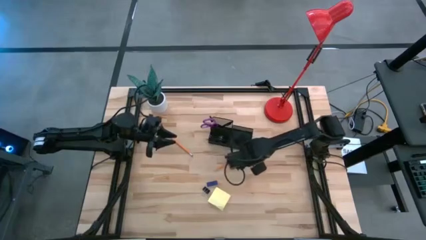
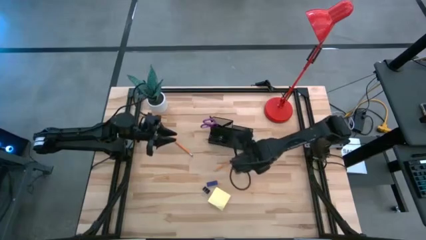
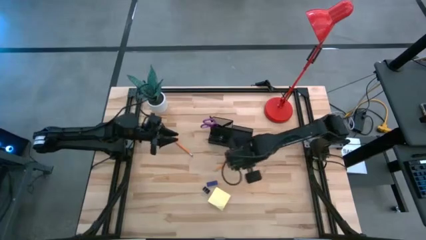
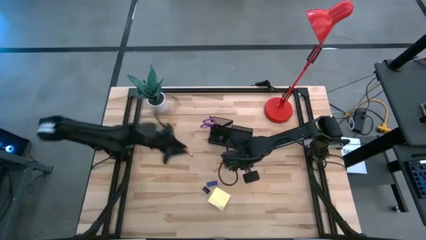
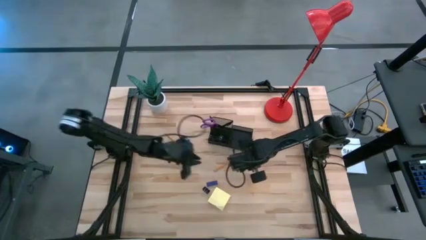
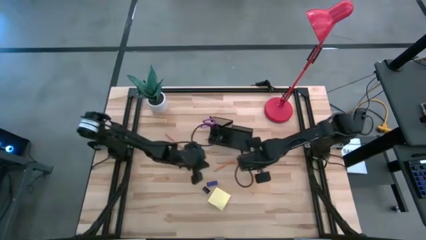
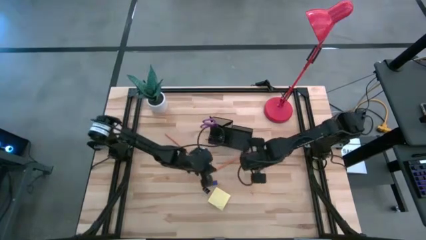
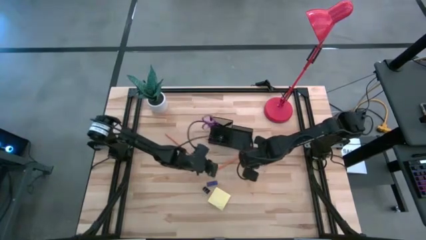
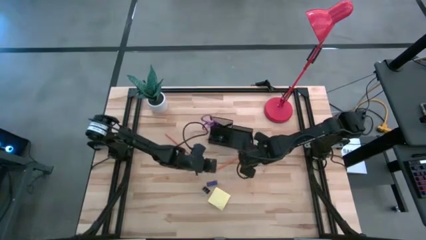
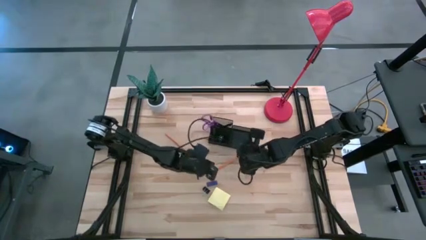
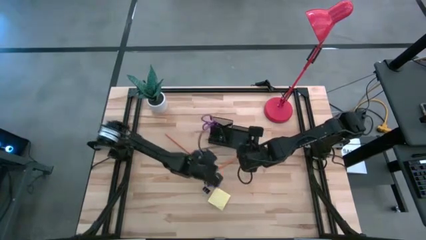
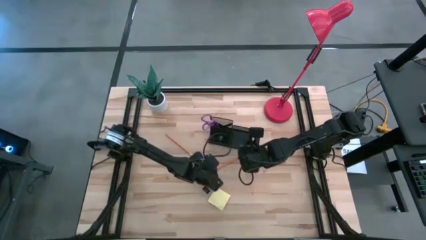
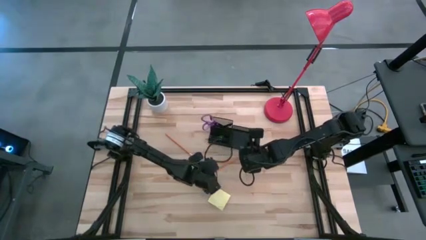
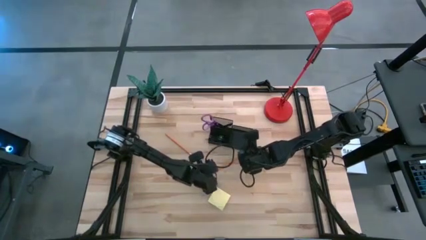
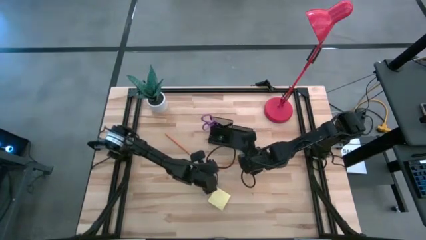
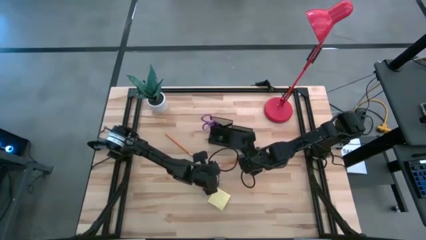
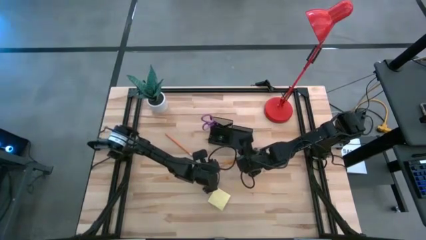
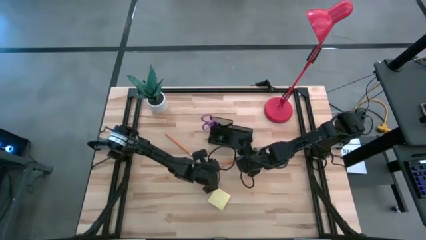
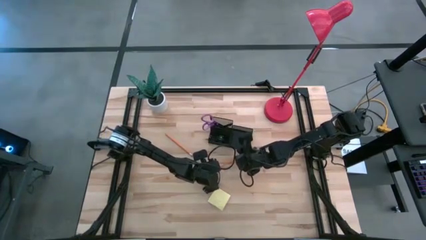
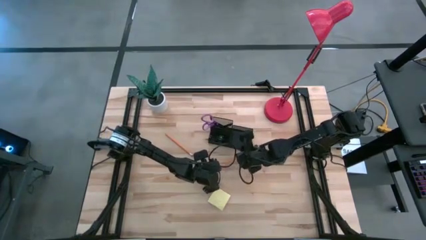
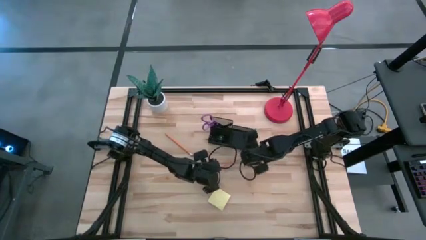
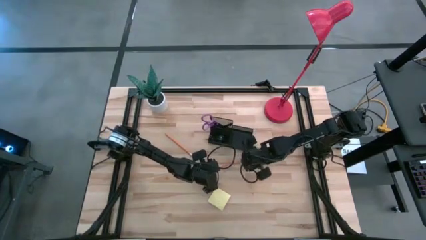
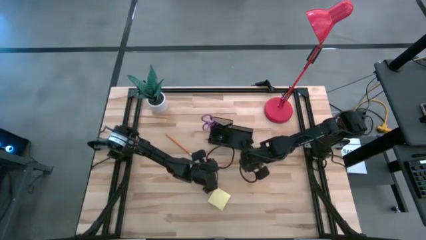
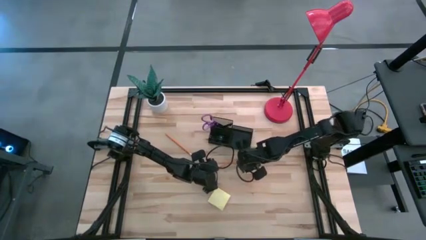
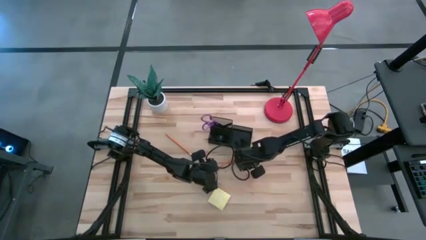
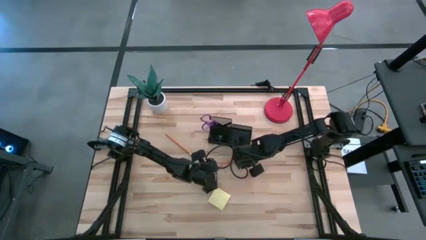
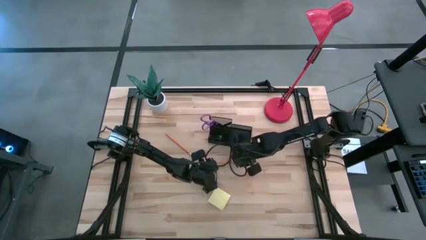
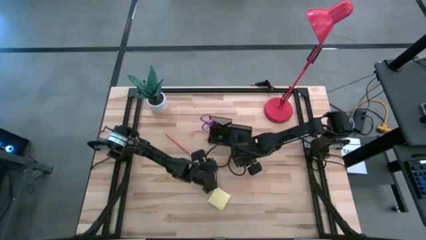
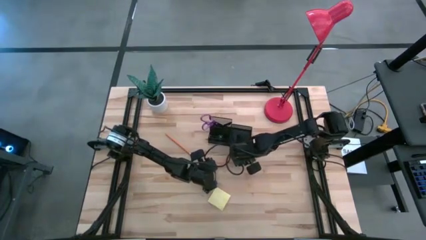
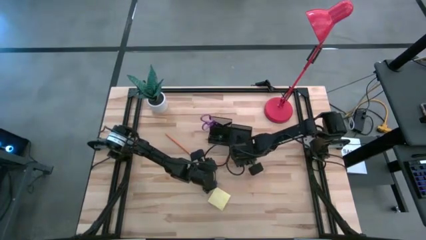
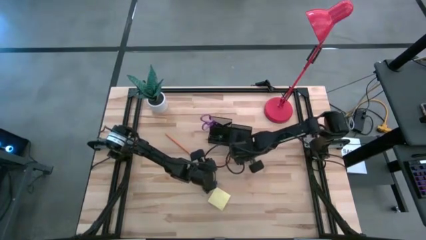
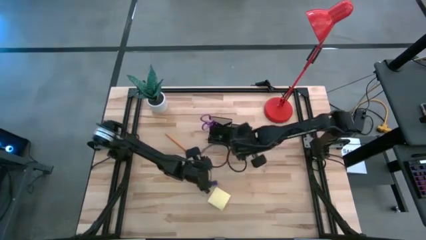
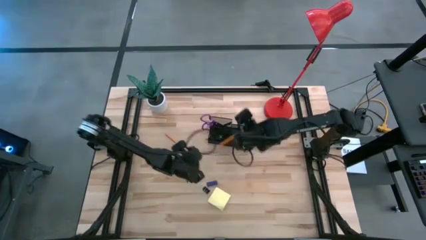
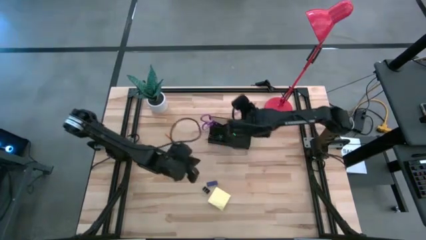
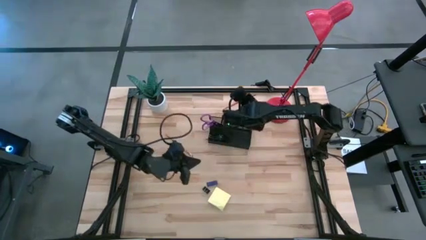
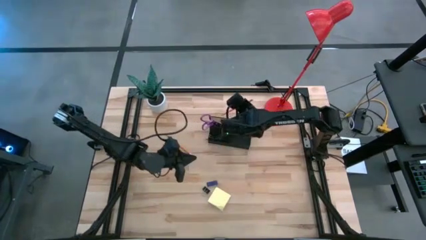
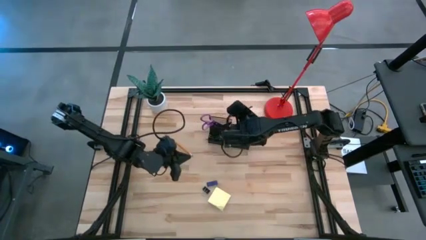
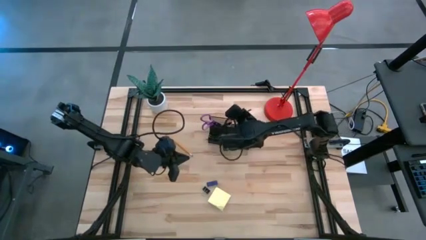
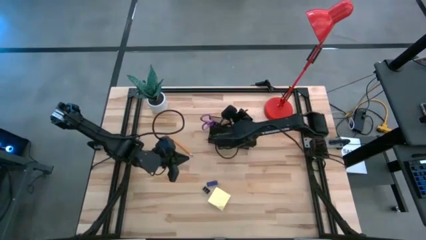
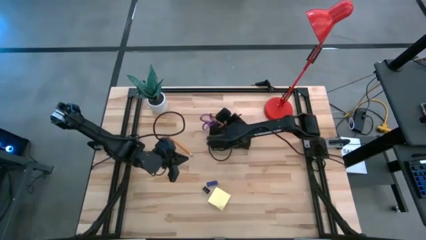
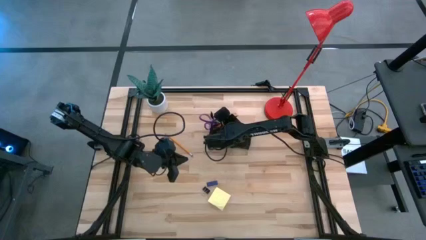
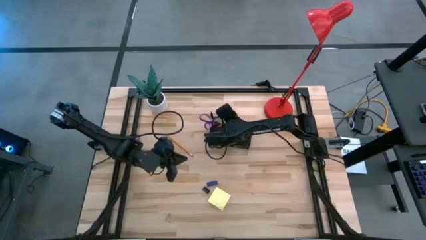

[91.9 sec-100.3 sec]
Task: Pick and place office supplies into organizer
Put the bottom orange pencil into the black desk organizer

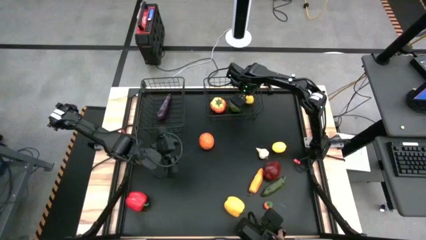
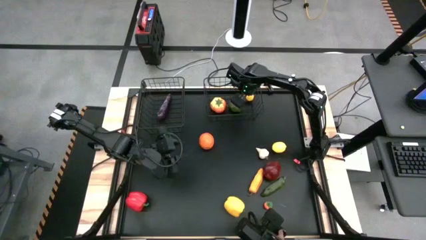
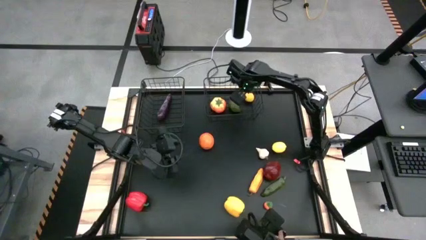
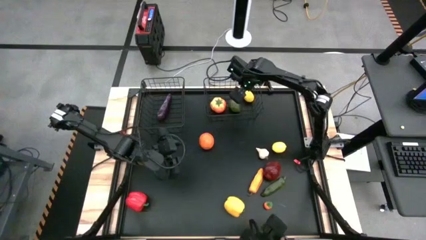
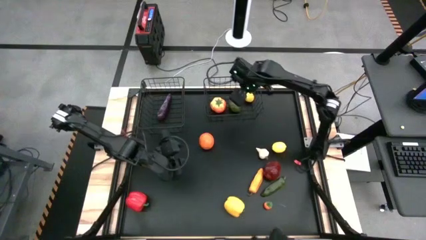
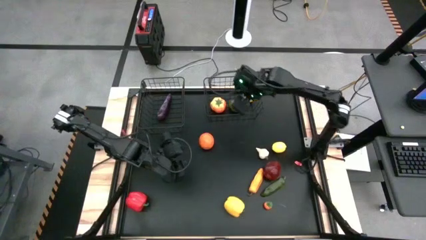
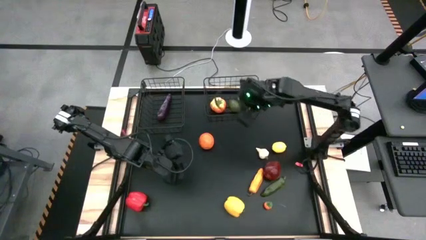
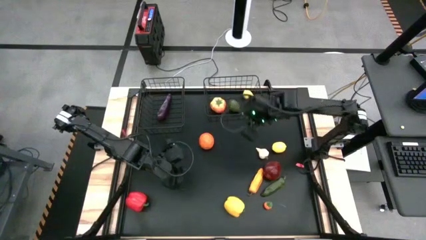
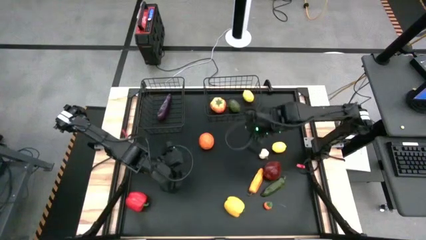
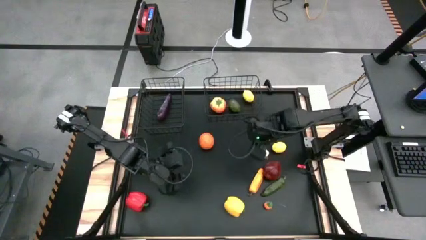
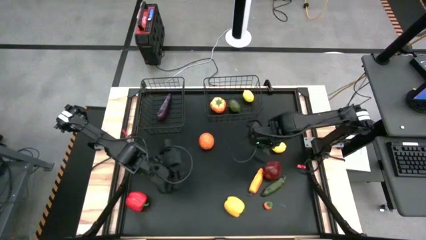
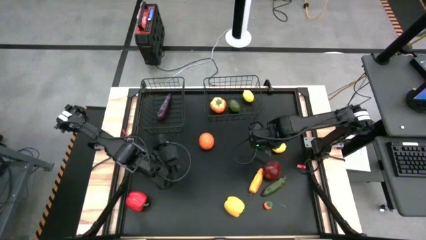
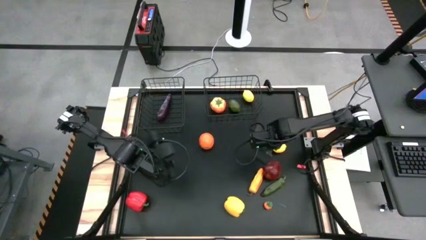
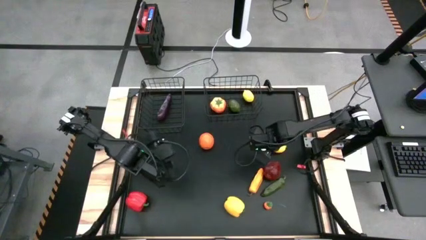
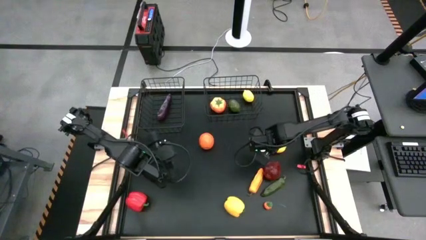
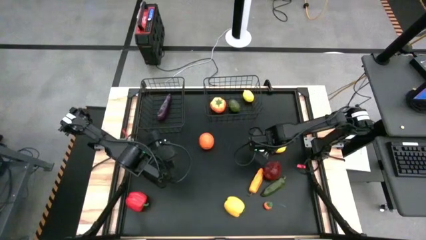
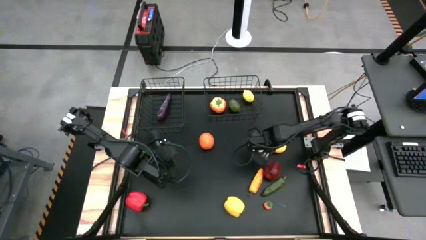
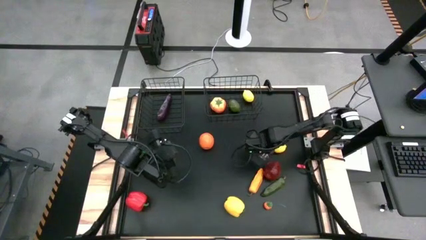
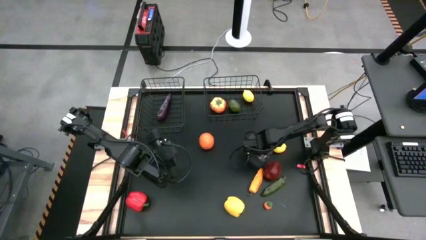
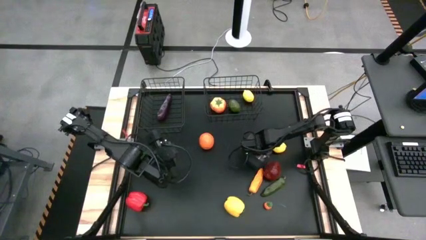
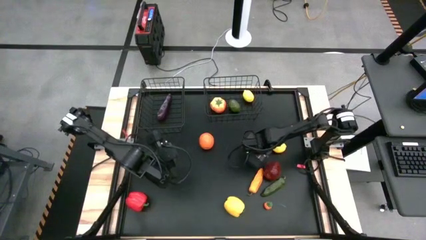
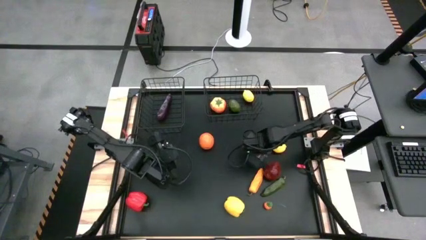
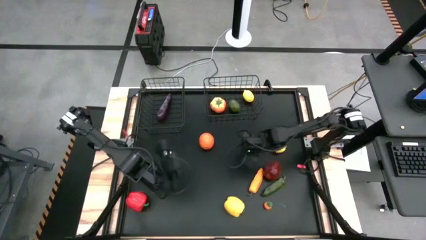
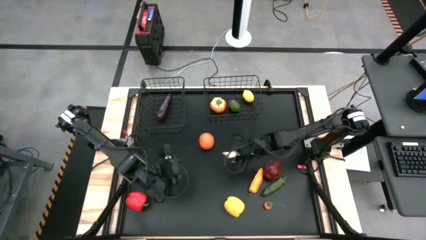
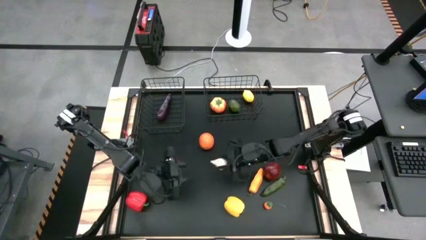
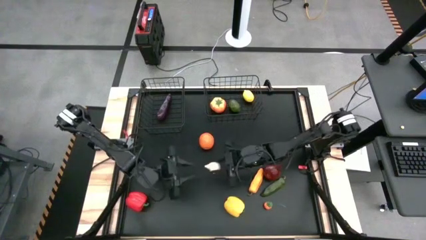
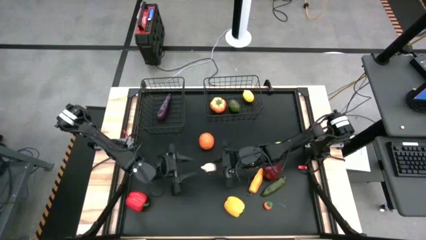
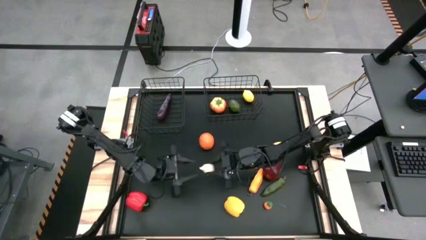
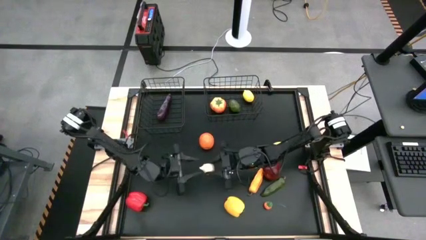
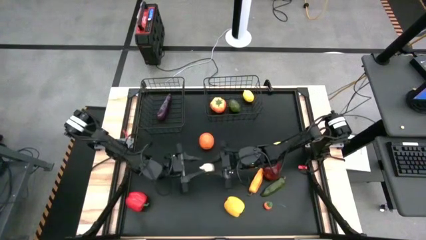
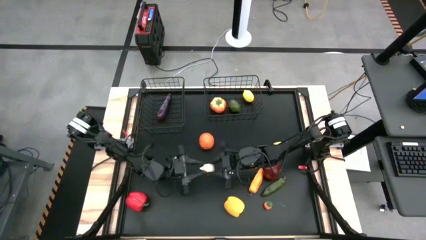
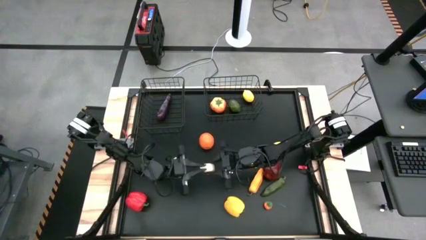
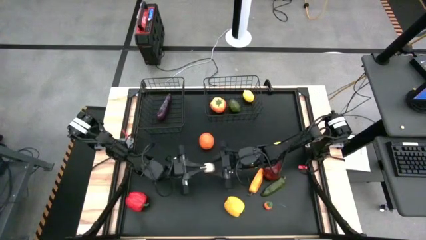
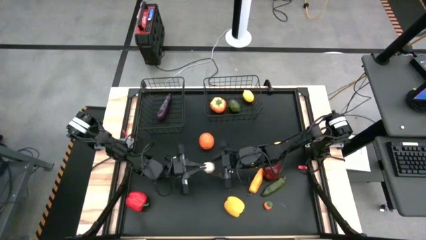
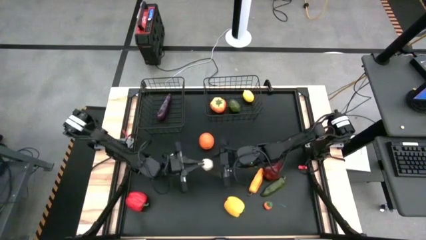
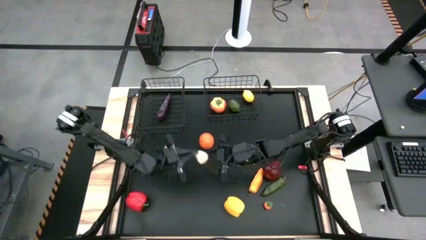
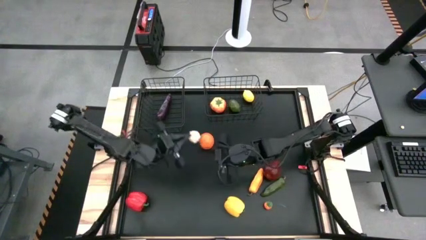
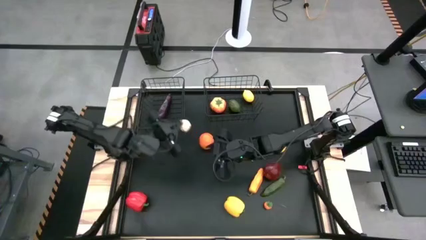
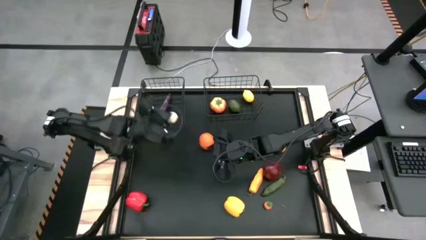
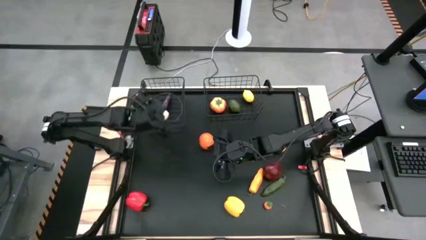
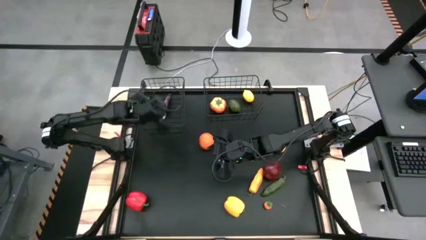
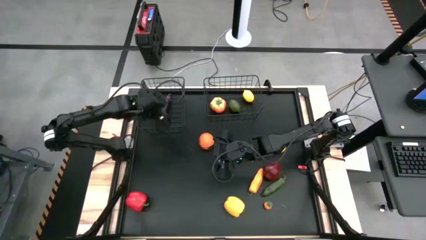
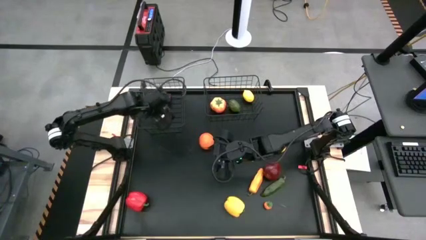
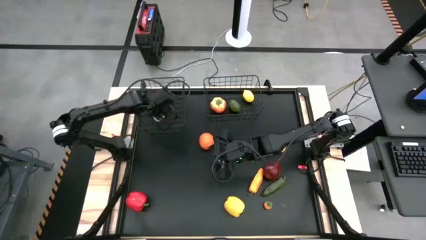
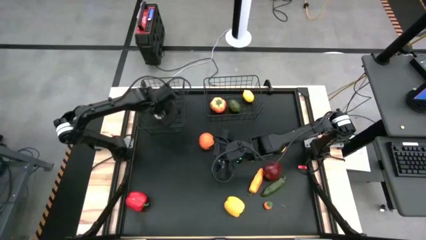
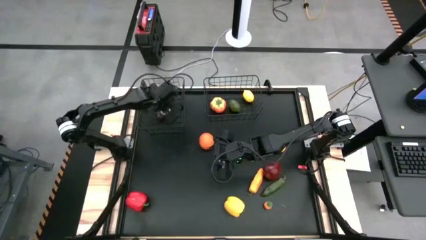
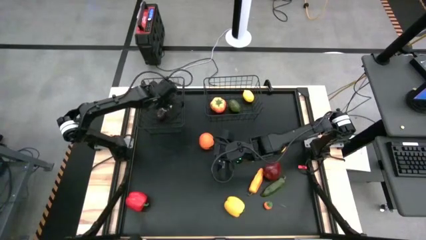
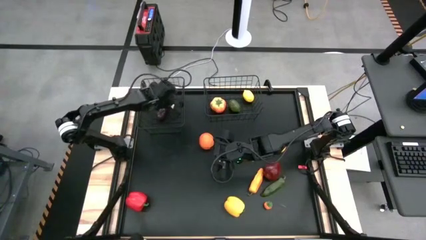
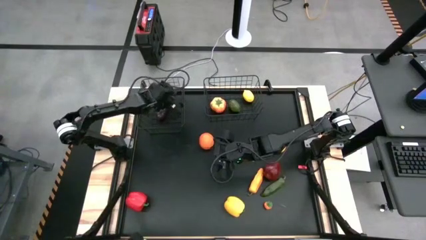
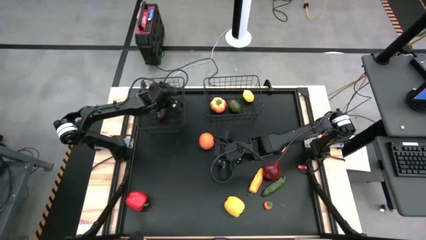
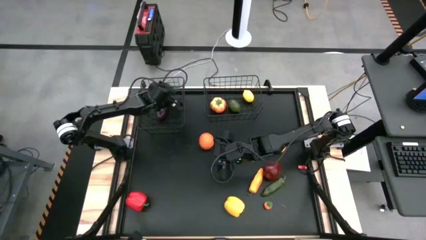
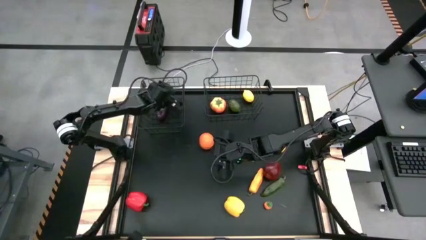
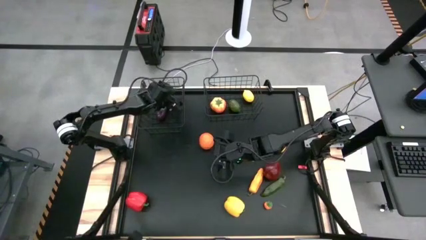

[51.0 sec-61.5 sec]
Task: Sort produce into baskets
Put the white garlic into the left black wire basket
